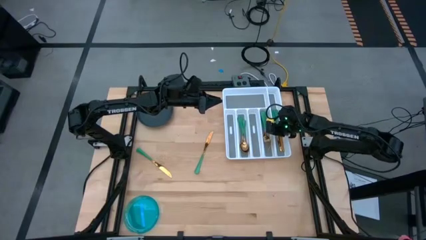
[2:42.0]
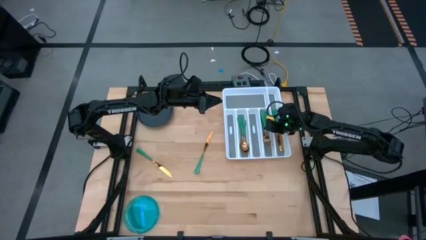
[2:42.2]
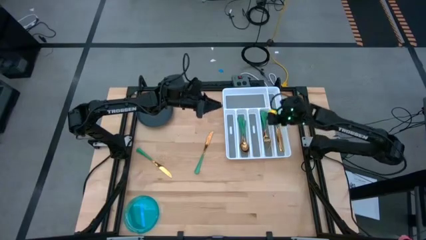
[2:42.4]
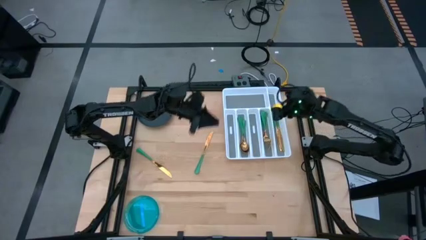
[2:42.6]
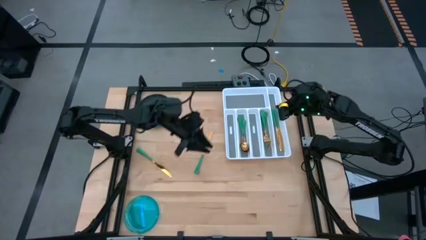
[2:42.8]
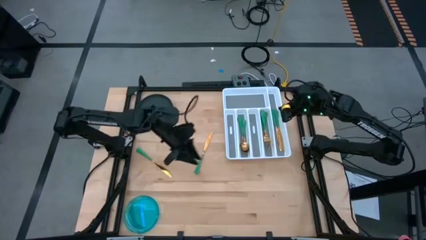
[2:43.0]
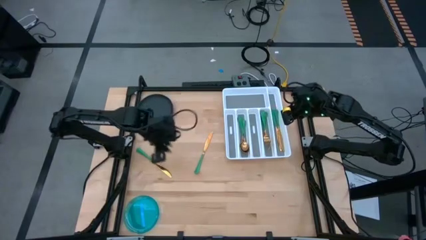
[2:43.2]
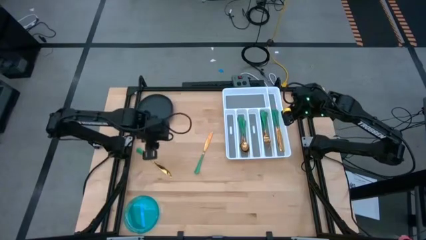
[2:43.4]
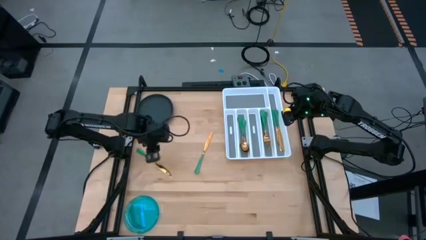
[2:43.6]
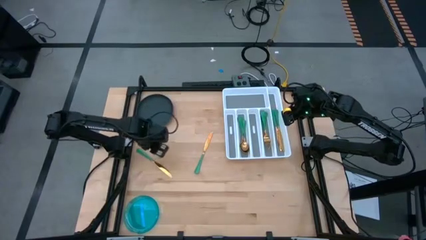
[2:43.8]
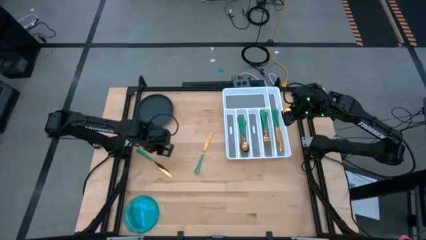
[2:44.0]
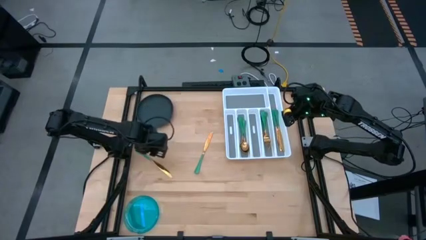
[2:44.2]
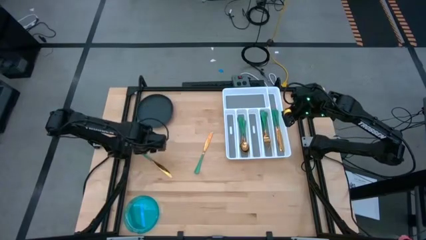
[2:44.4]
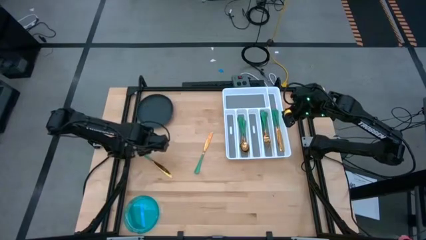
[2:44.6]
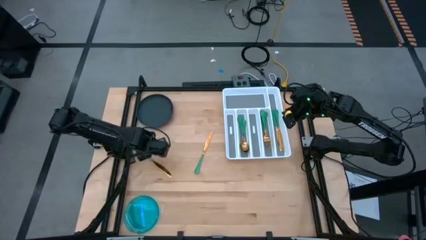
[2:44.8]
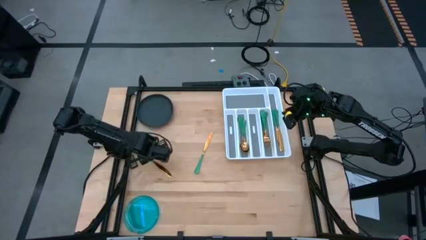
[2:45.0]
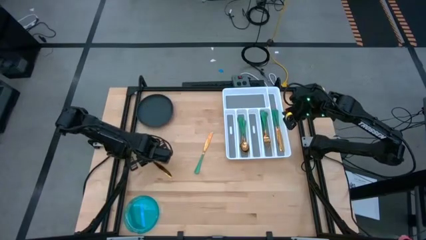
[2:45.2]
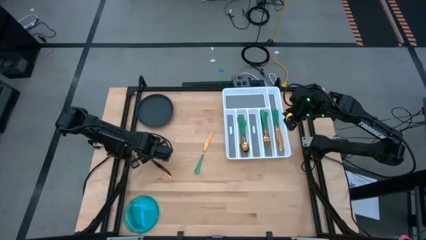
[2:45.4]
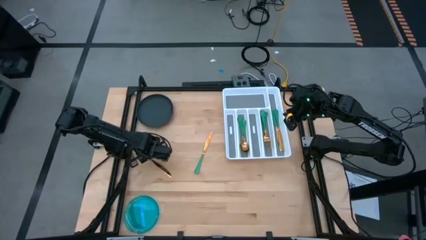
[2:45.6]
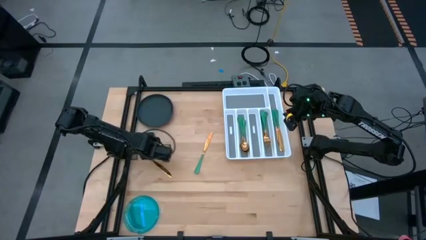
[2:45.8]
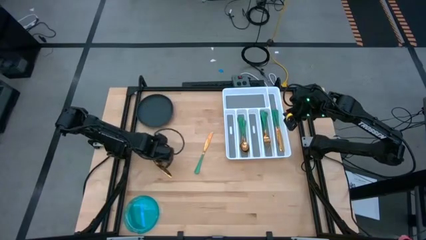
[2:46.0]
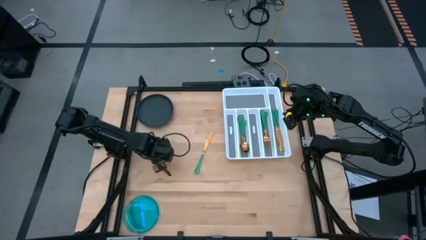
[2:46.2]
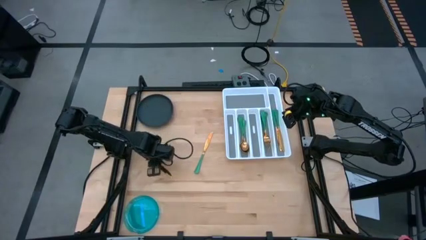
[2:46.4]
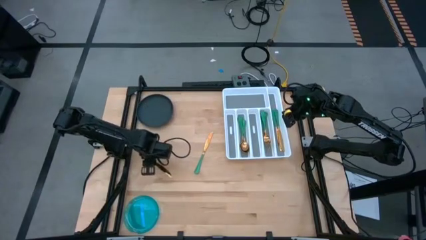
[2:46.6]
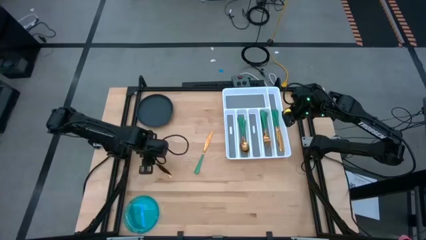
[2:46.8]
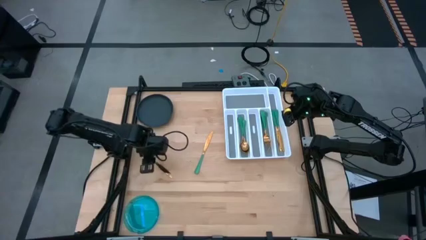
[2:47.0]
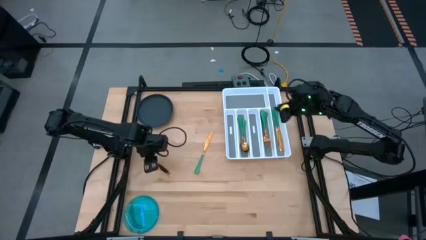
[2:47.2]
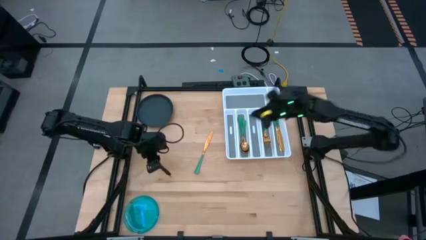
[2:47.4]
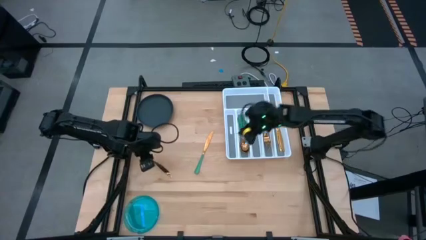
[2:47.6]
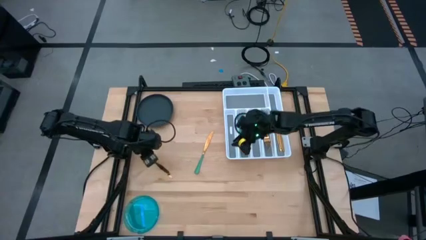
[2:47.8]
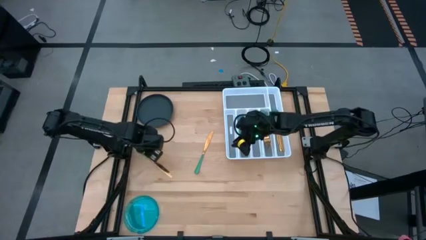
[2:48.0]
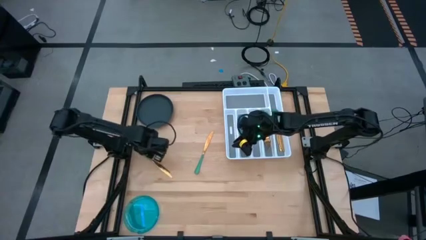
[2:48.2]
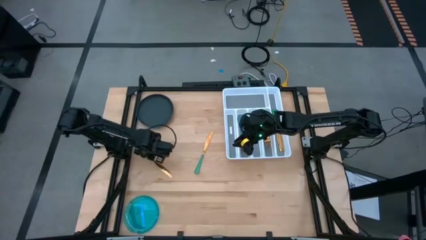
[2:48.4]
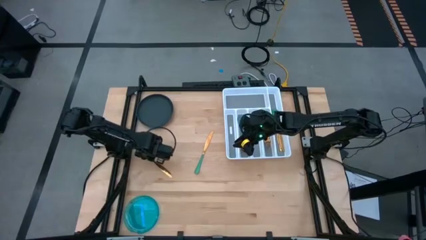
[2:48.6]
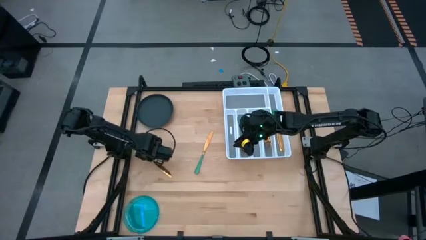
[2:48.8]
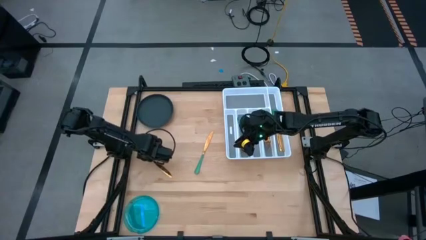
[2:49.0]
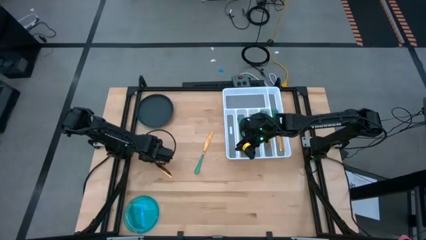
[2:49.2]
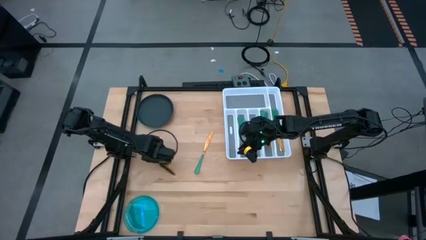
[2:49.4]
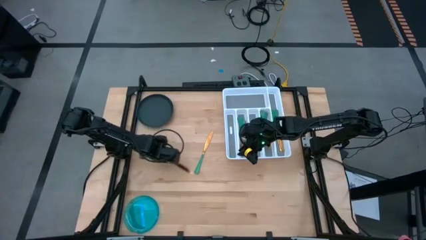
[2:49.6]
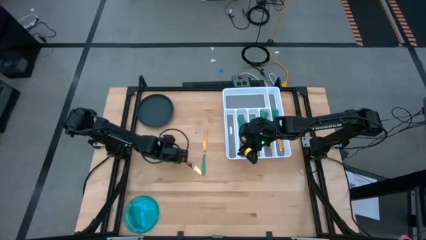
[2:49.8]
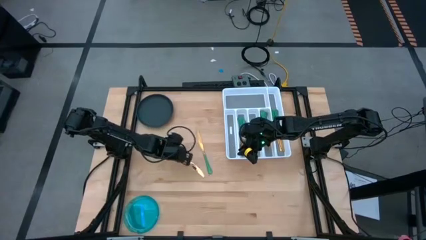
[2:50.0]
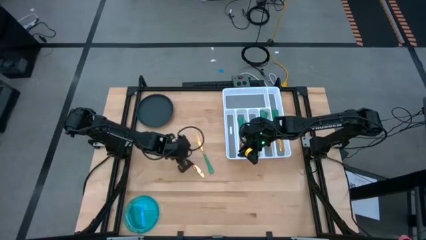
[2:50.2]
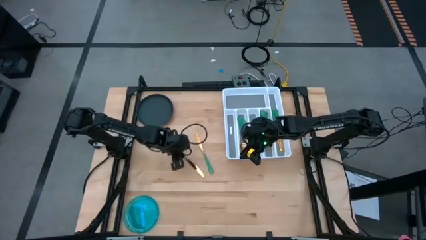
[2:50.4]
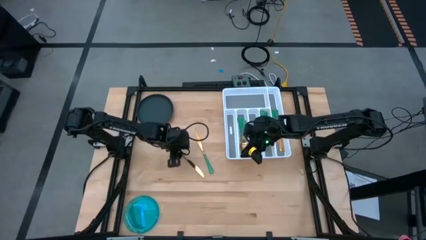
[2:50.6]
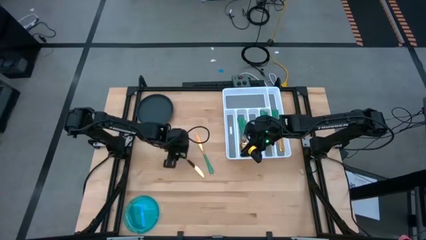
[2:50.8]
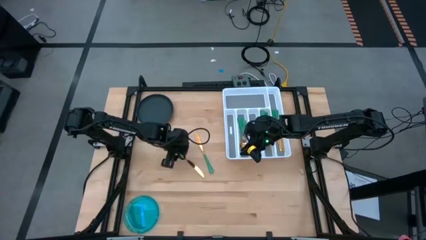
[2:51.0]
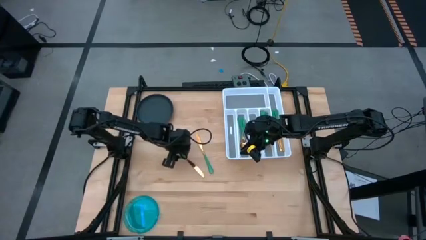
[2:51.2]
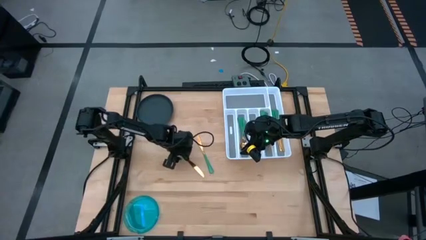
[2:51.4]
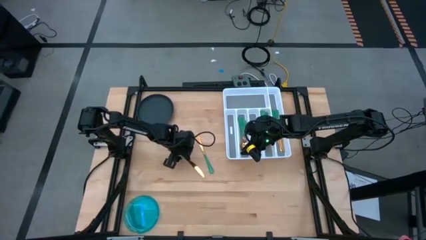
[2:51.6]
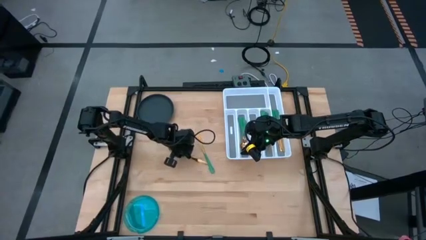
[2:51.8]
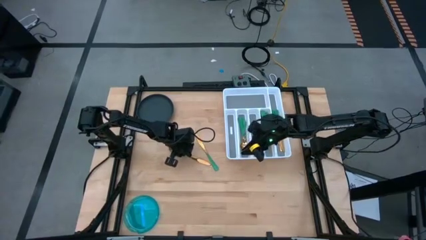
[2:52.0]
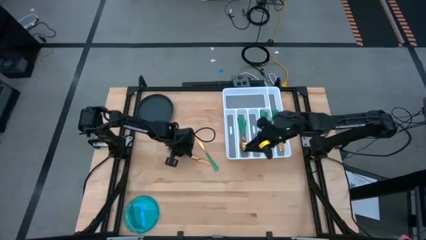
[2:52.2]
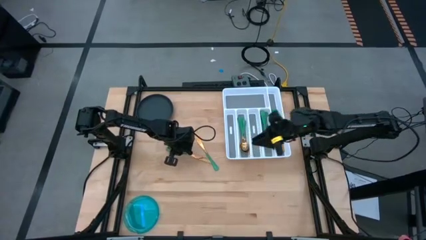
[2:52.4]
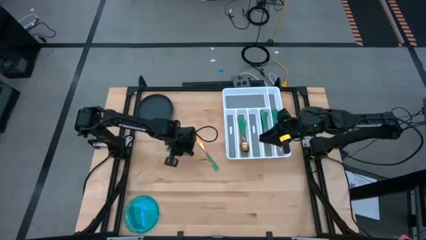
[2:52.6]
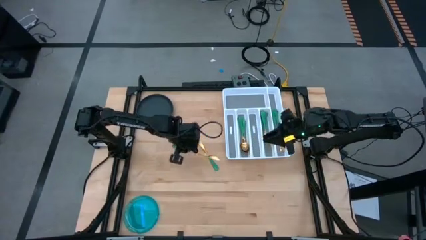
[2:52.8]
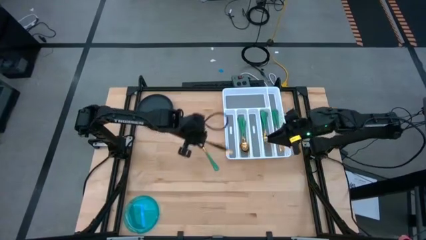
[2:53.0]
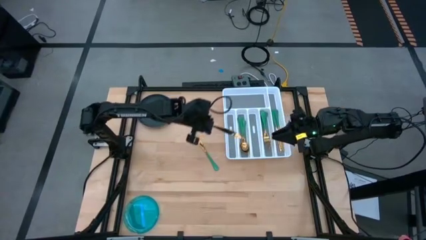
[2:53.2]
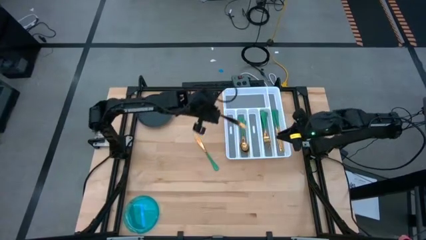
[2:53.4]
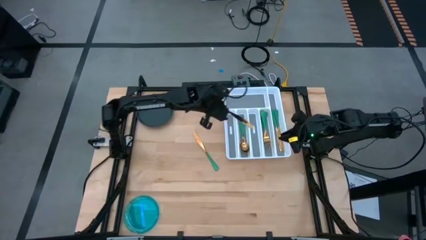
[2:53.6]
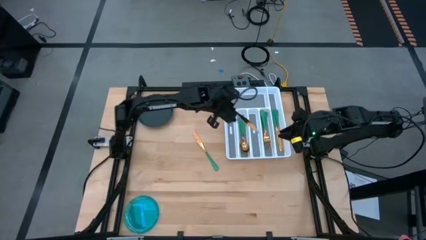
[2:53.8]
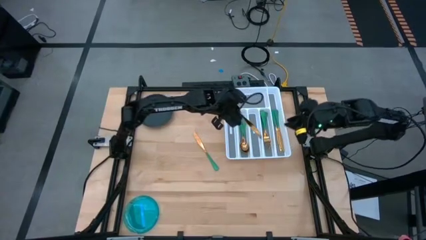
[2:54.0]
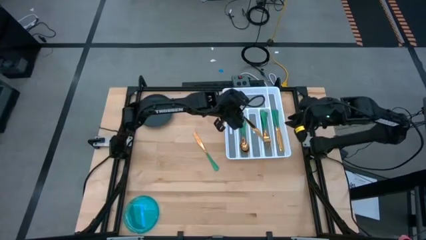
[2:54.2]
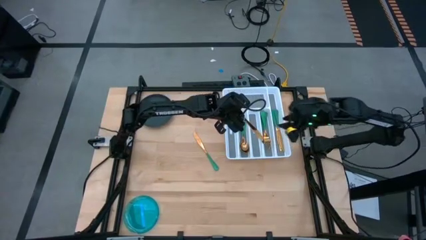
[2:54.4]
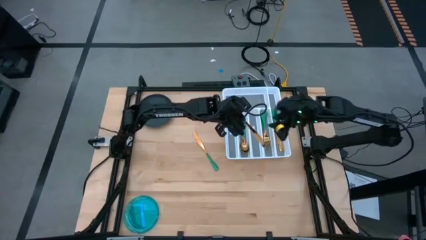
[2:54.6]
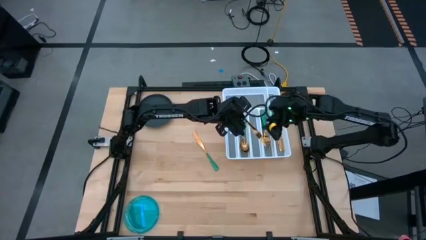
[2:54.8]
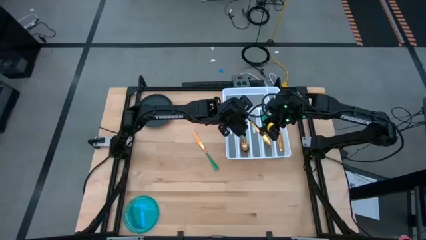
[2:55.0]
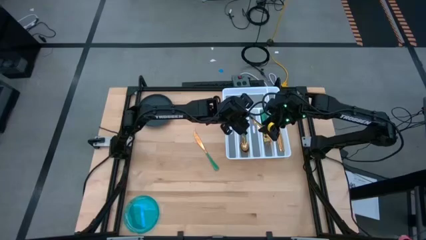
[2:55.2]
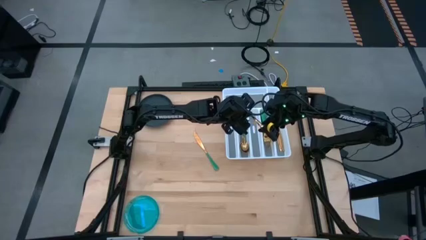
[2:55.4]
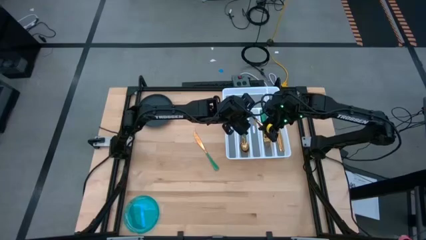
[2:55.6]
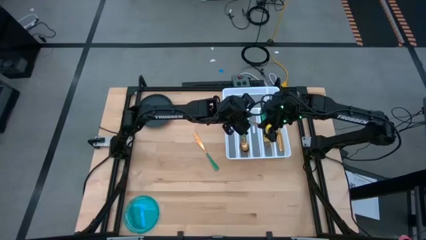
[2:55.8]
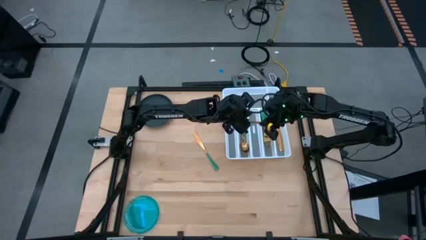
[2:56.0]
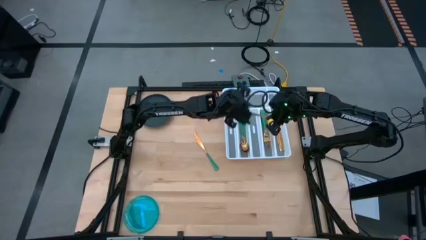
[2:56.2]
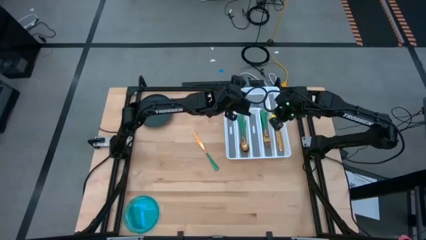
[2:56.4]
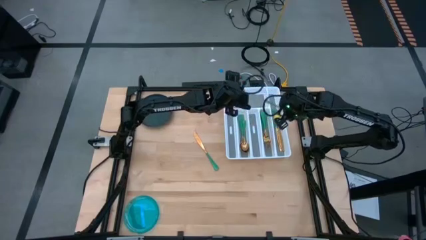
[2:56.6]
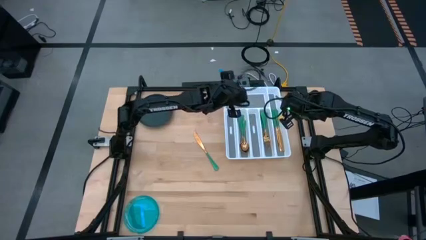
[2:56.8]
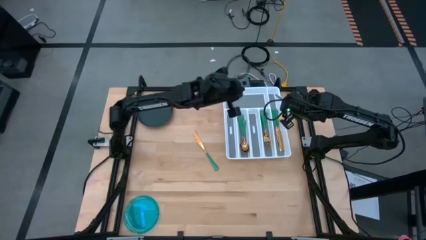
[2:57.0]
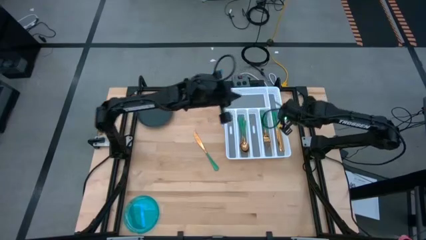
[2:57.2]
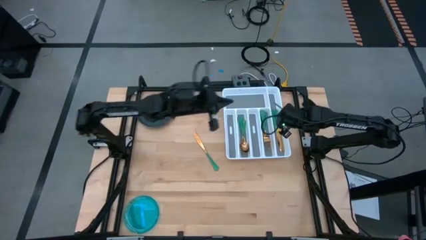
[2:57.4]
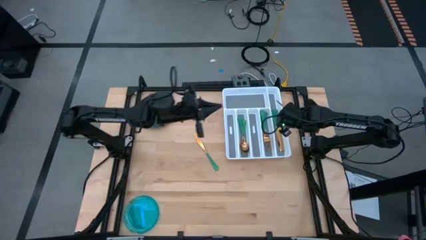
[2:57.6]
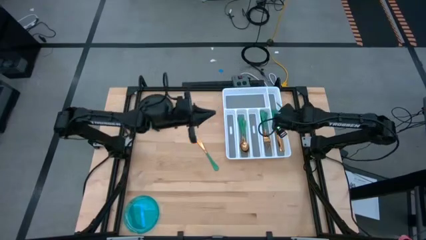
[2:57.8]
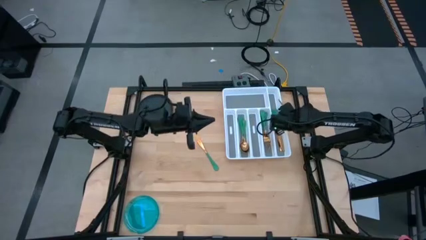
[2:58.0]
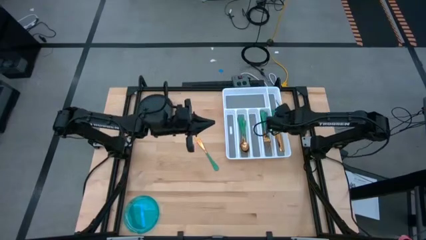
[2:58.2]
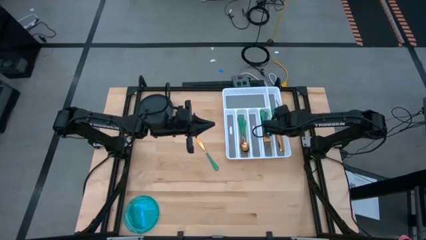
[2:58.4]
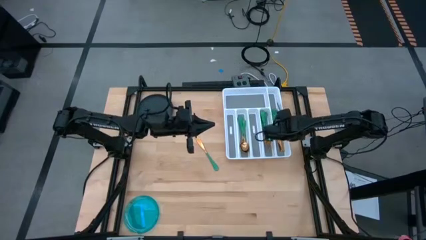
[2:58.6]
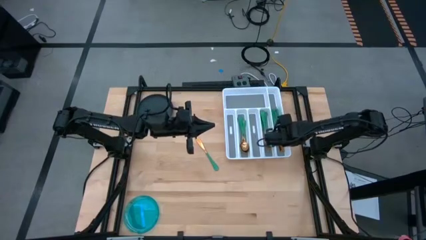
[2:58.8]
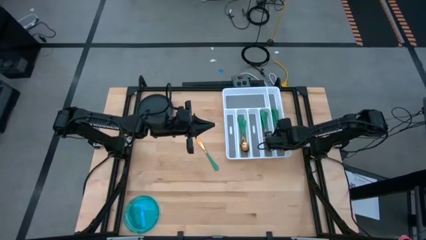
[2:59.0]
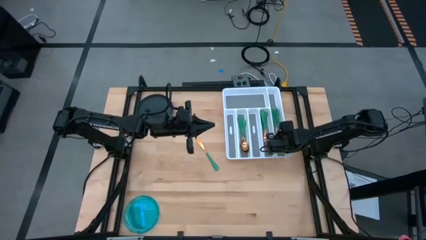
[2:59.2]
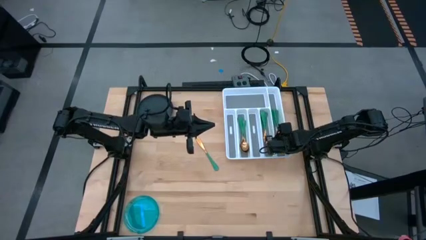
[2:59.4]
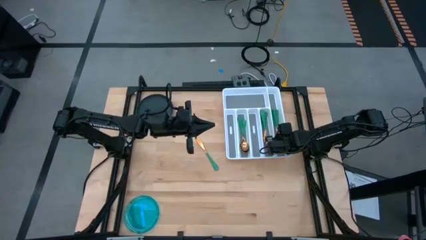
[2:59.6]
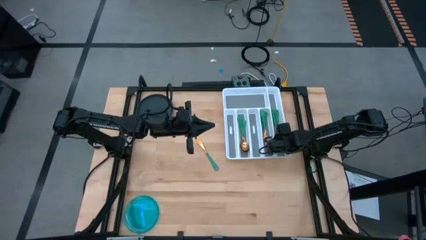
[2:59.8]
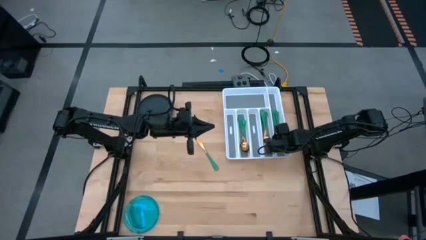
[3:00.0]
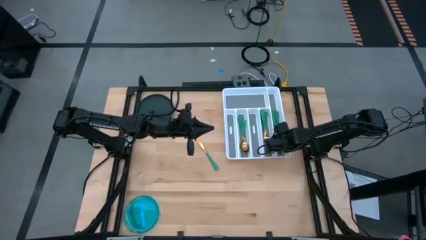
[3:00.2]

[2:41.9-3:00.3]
Task: Sort silverware
Put the left green knife into the silverware tray
